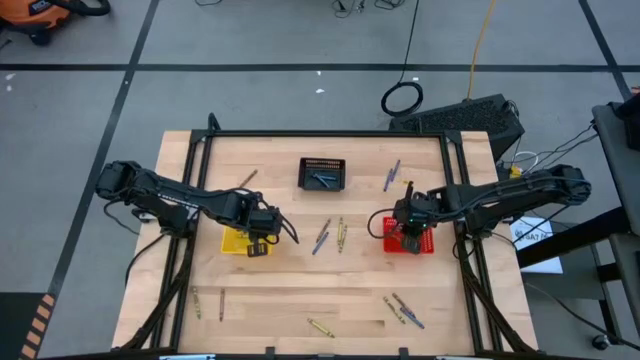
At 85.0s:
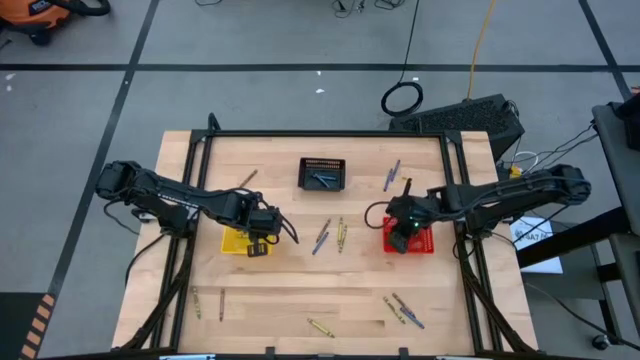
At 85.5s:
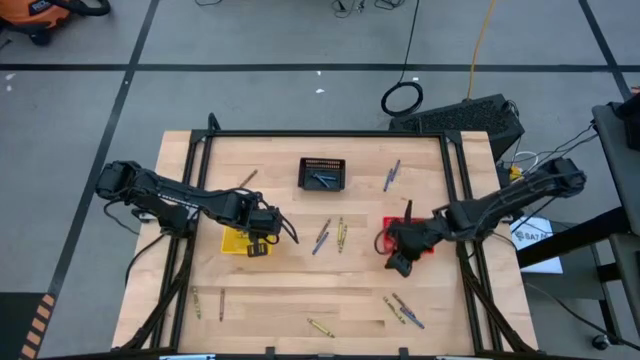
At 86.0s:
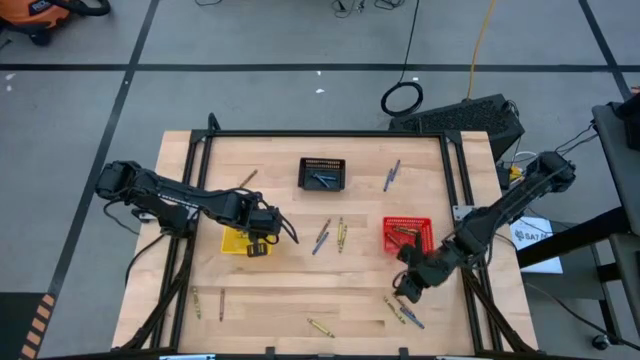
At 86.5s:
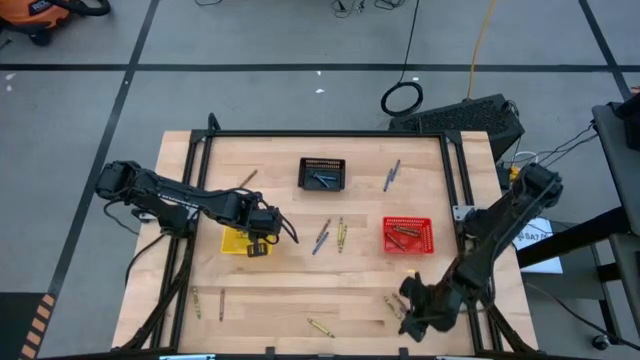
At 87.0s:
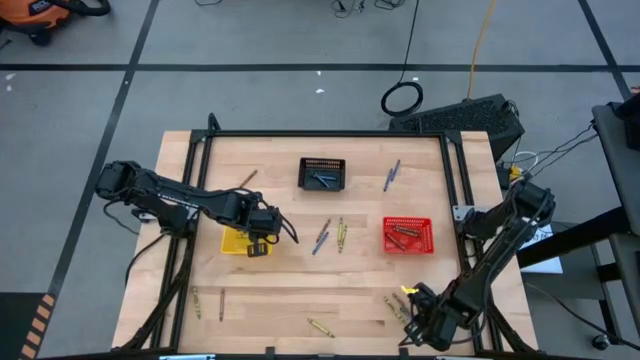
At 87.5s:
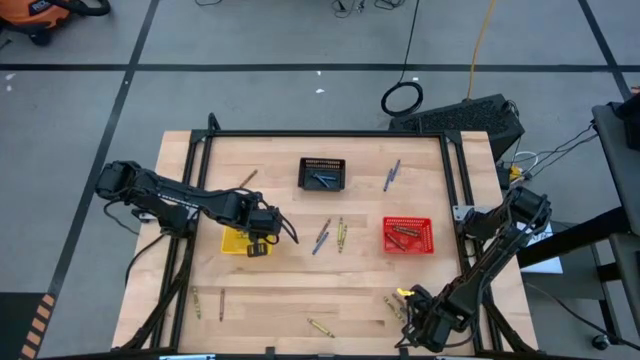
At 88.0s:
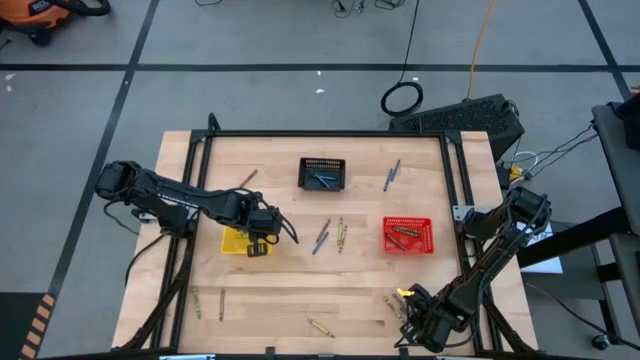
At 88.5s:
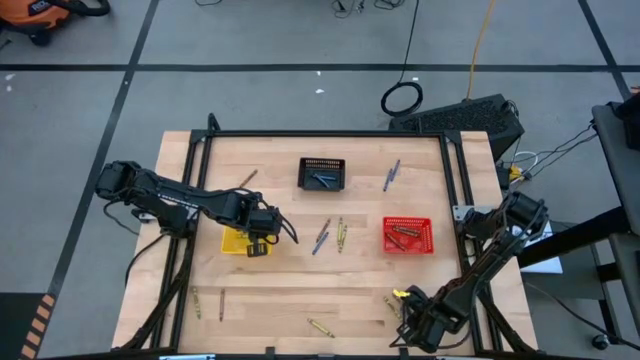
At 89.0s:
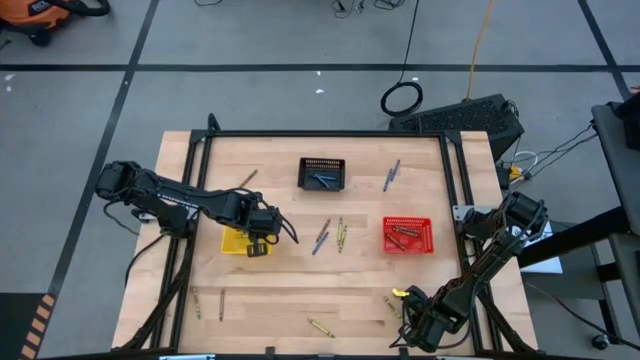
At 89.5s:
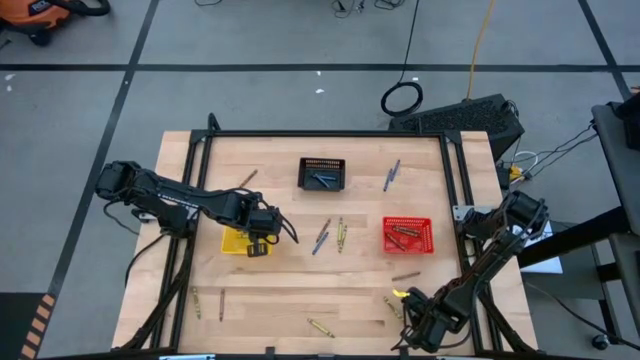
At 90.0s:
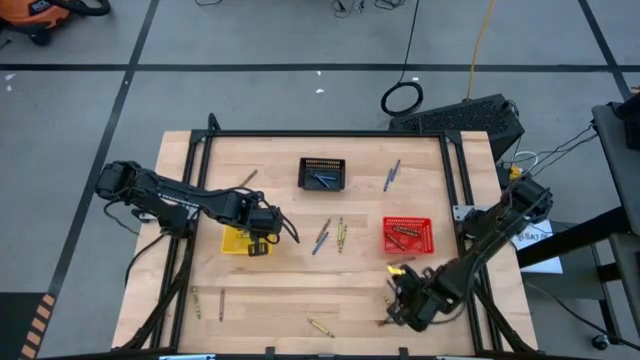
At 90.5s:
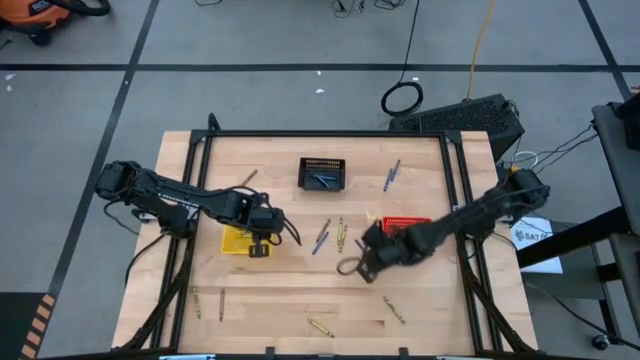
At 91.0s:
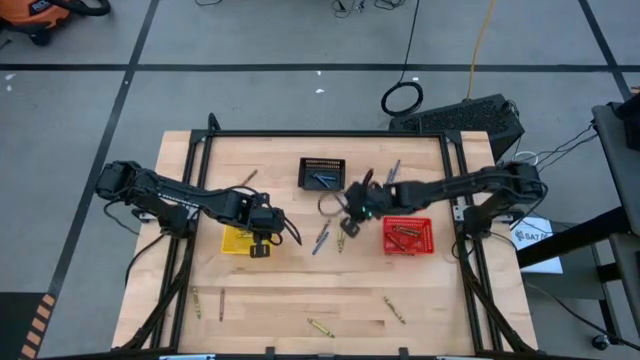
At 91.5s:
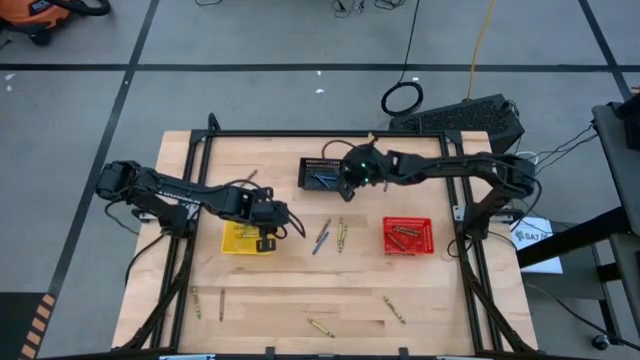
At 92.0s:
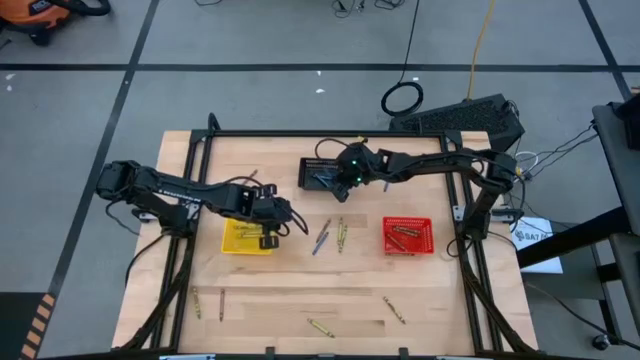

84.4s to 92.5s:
Task: Sort crayons
Put the blue crayon into the black bin

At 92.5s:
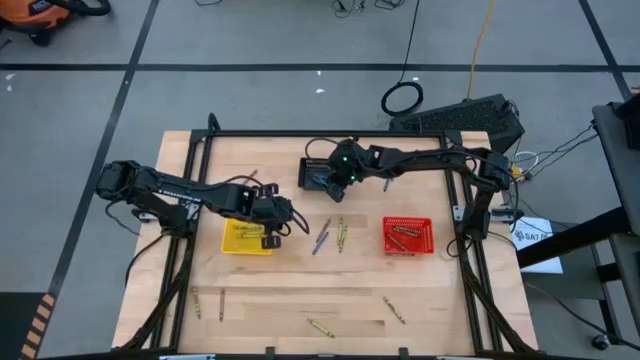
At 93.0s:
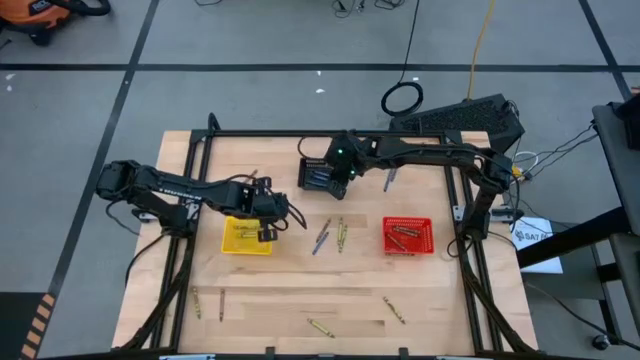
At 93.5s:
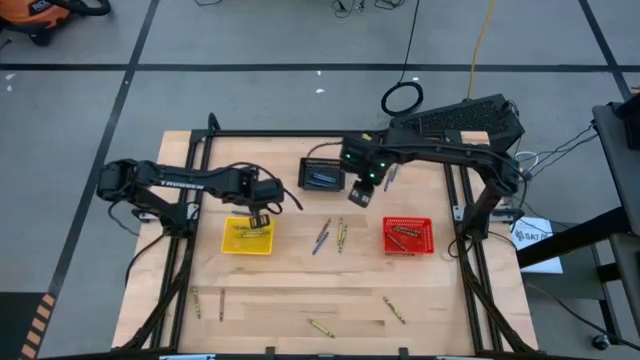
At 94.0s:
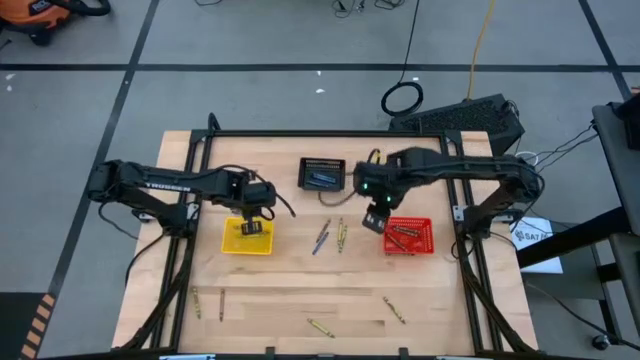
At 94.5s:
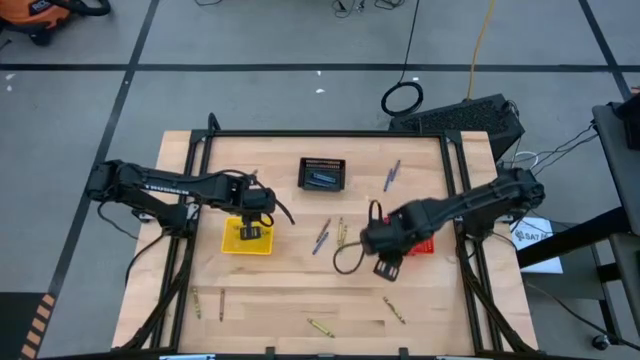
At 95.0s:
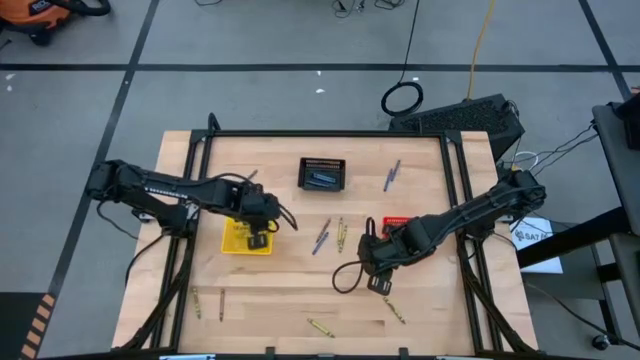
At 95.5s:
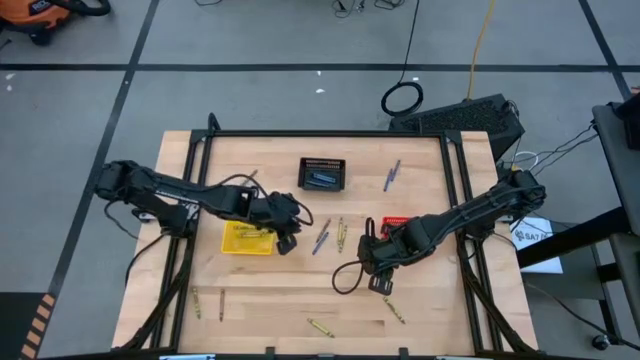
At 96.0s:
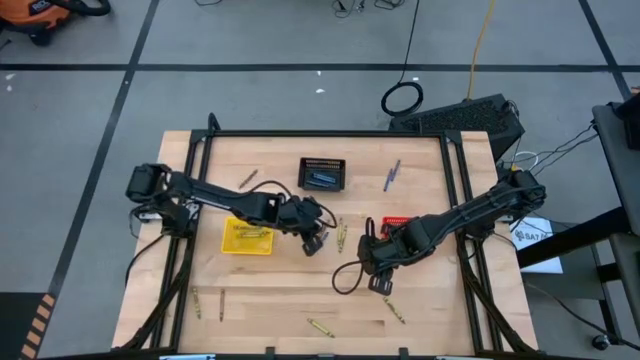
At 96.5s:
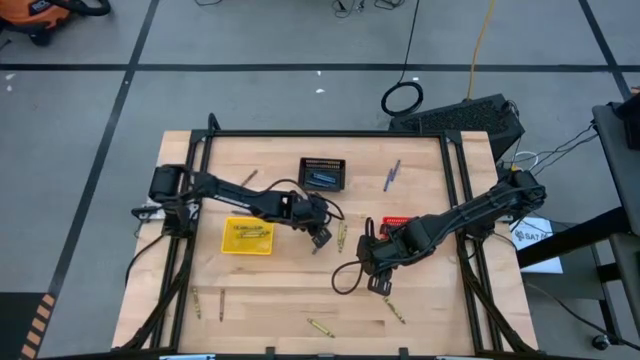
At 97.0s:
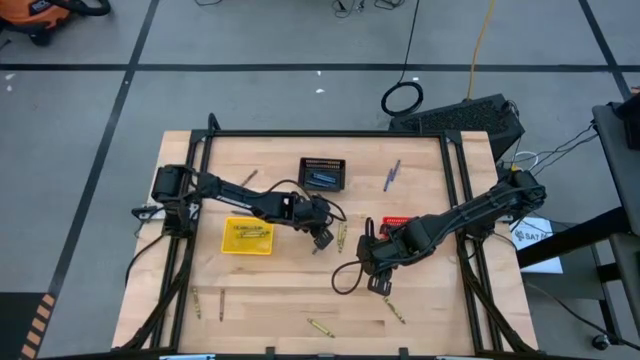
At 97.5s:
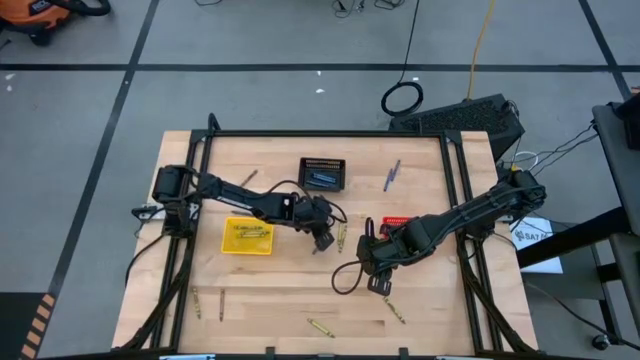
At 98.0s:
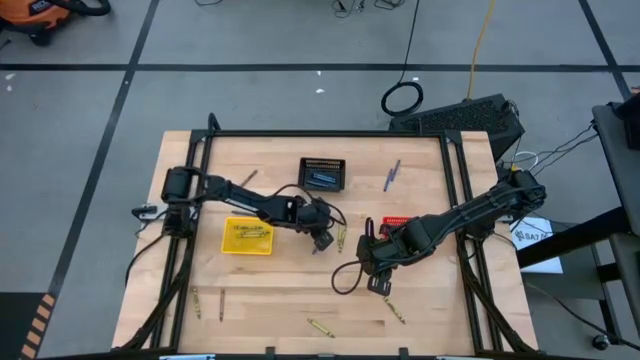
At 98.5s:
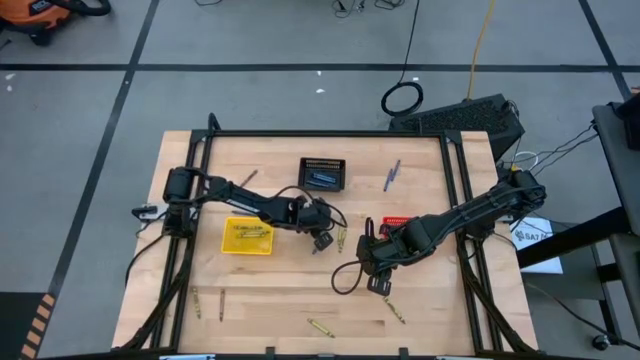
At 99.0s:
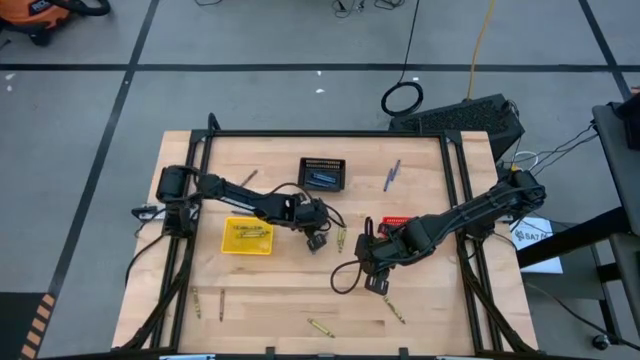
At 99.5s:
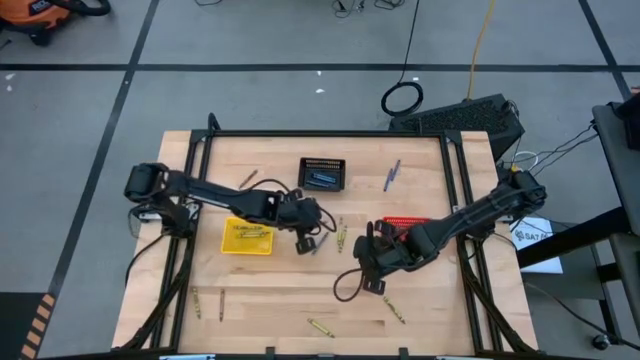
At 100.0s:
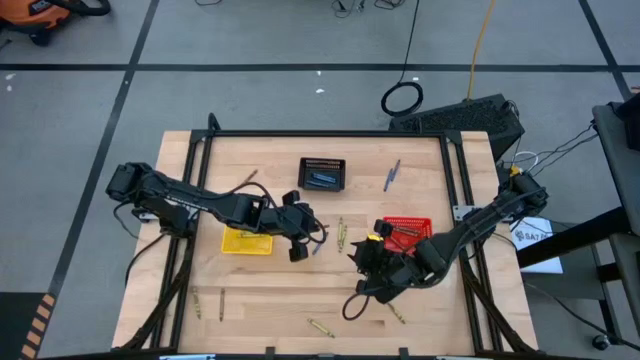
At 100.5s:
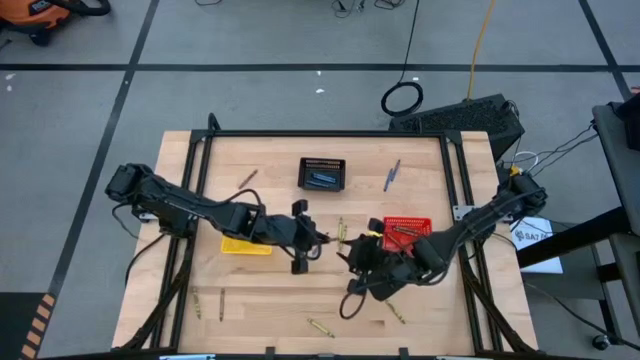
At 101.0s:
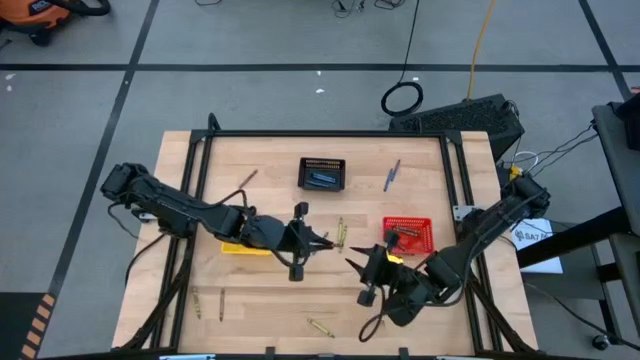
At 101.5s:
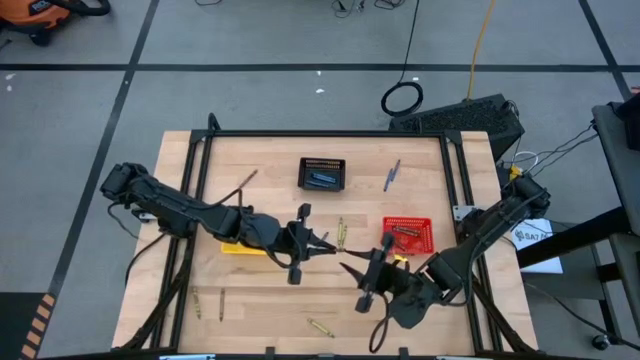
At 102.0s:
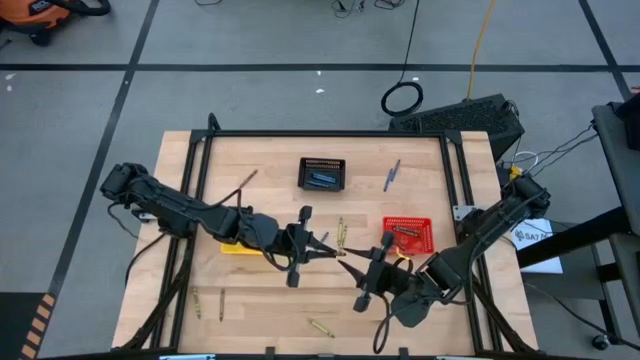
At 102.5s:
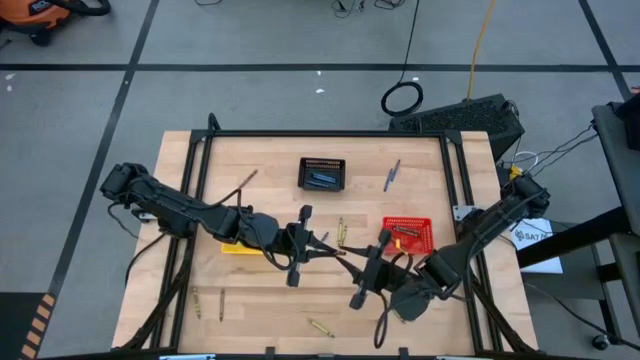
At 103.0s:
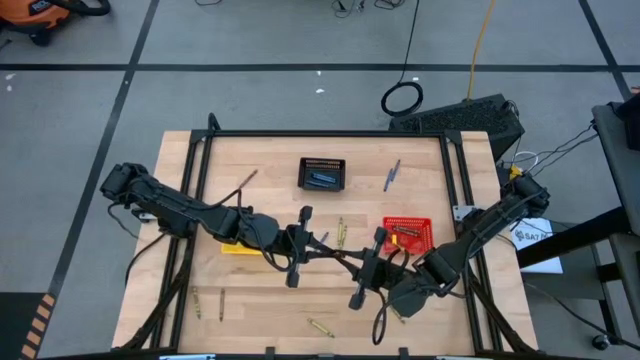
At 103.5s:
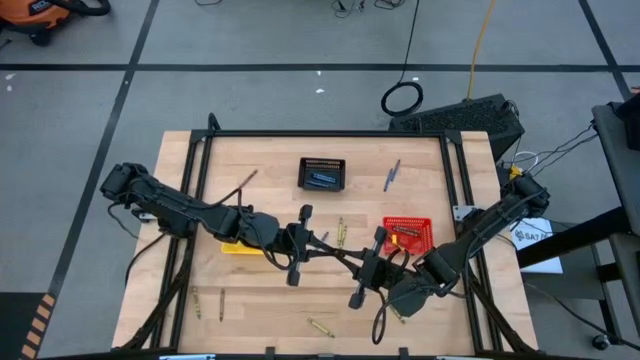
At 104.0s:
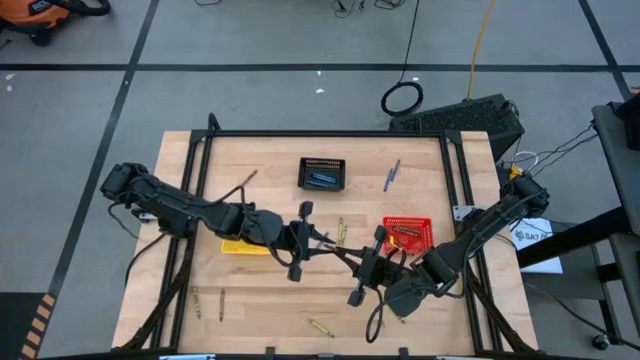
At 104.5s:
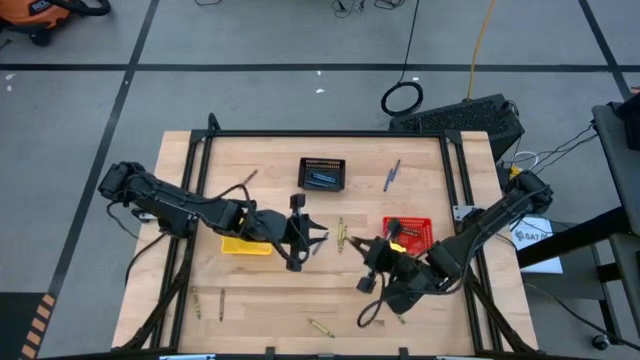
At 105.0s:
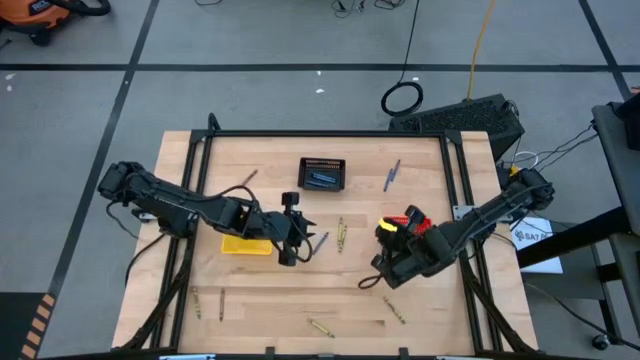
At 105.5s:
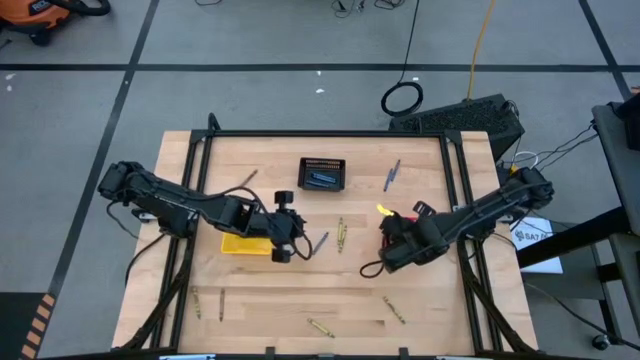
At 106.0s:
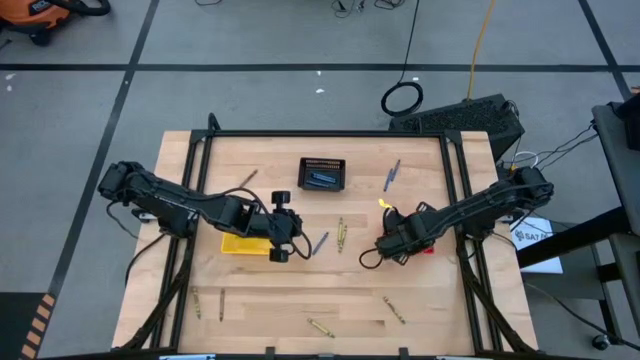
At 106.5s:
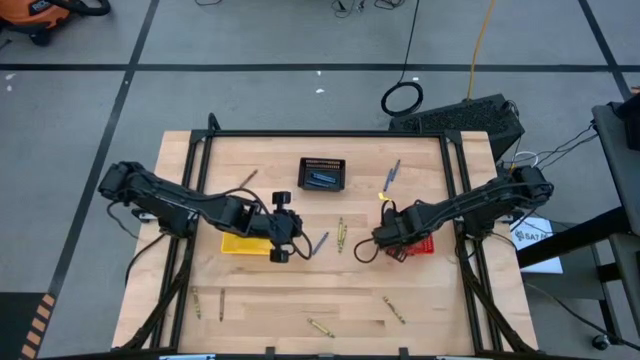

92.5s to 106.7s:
Put the brown crayon into the red bin
